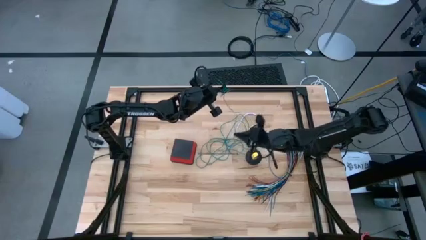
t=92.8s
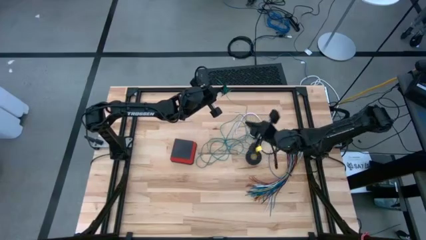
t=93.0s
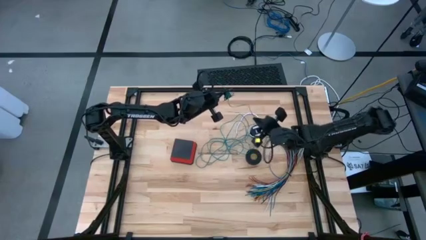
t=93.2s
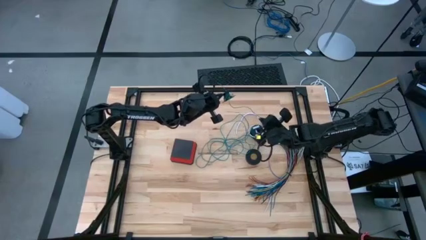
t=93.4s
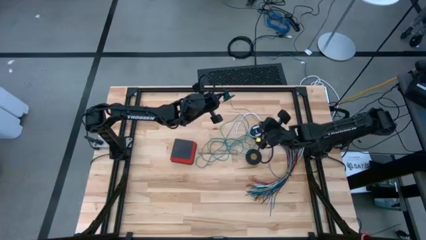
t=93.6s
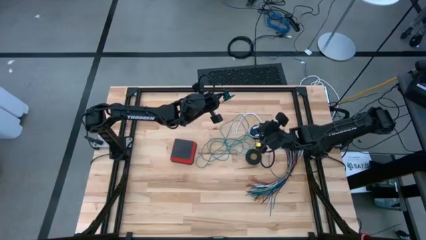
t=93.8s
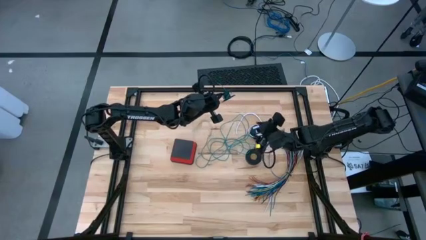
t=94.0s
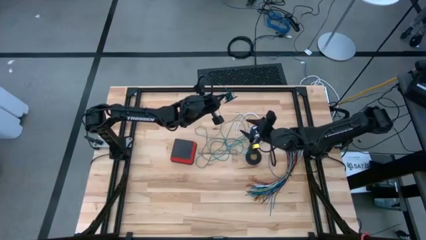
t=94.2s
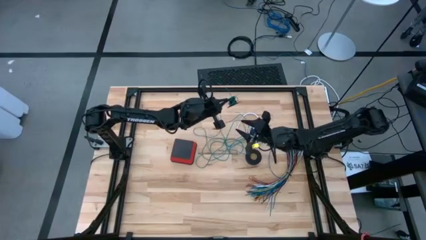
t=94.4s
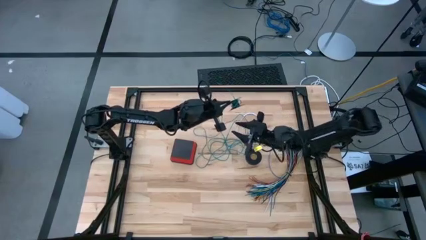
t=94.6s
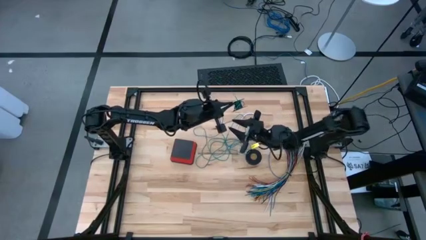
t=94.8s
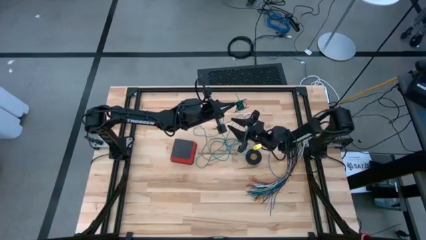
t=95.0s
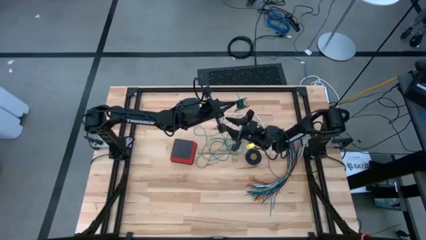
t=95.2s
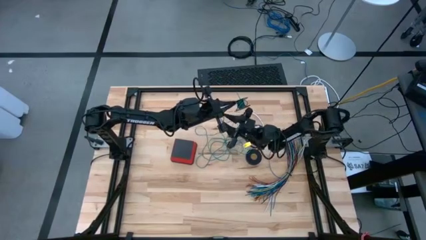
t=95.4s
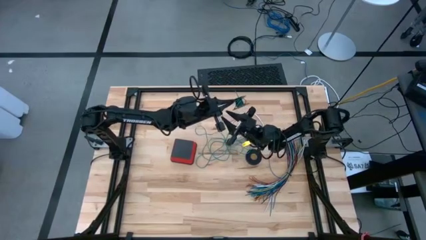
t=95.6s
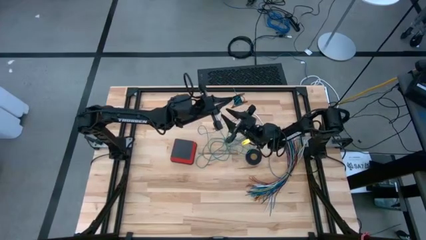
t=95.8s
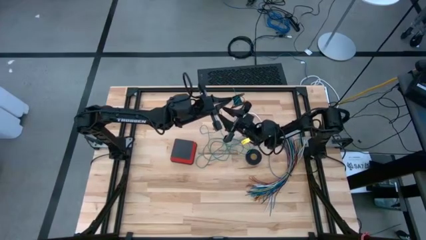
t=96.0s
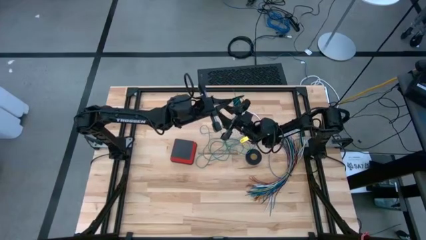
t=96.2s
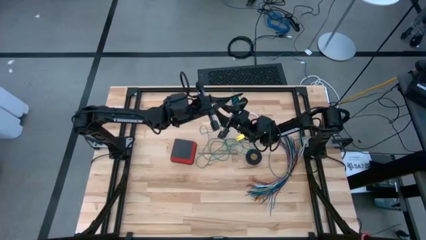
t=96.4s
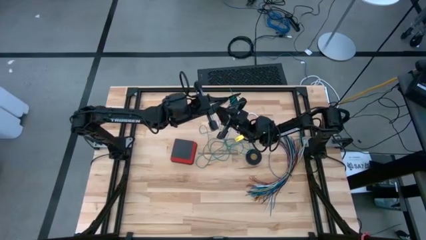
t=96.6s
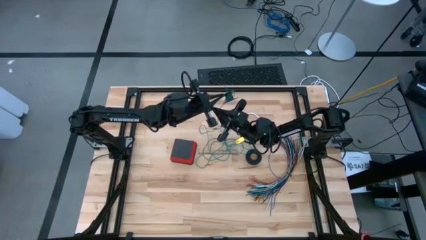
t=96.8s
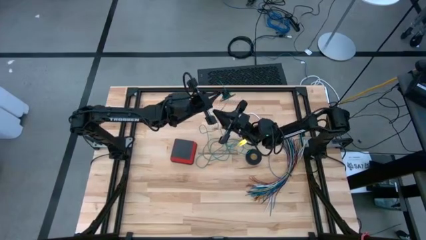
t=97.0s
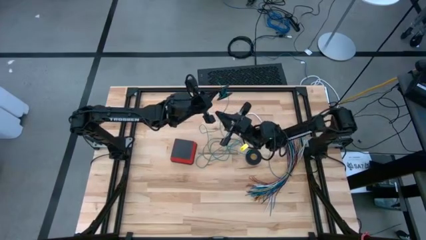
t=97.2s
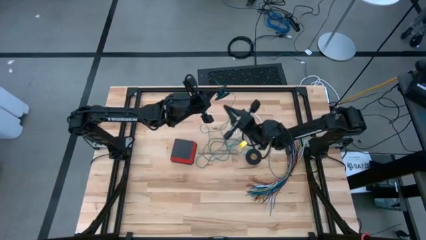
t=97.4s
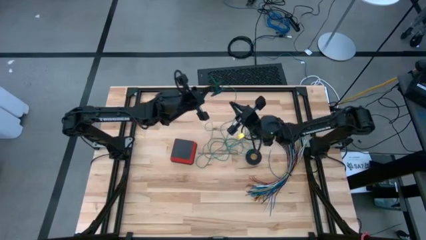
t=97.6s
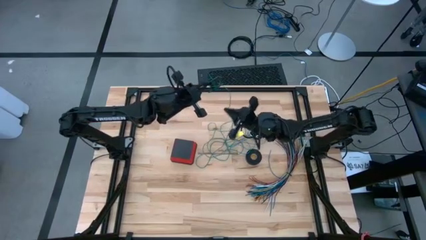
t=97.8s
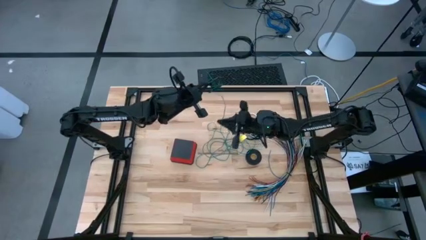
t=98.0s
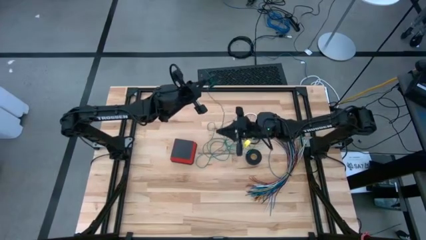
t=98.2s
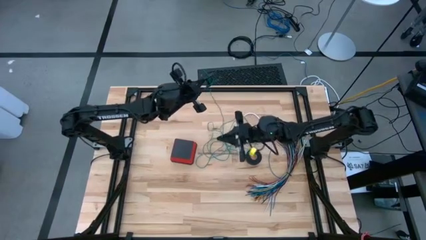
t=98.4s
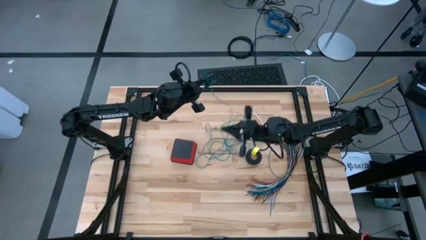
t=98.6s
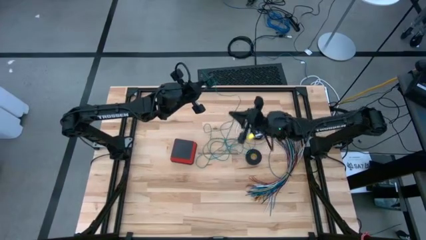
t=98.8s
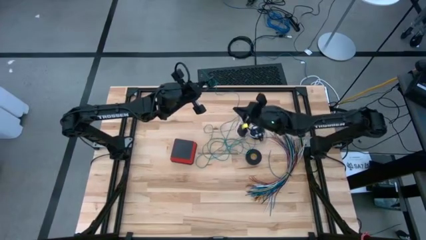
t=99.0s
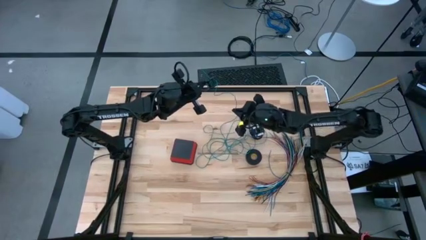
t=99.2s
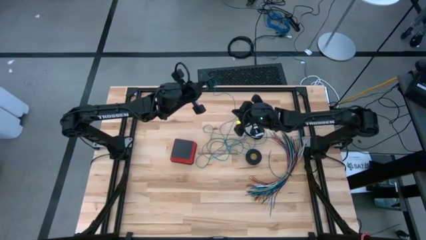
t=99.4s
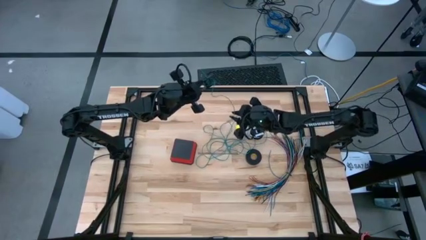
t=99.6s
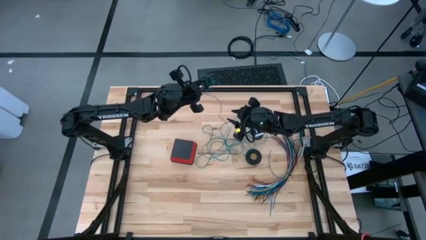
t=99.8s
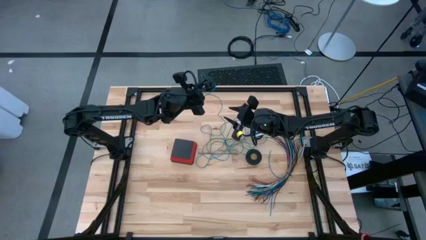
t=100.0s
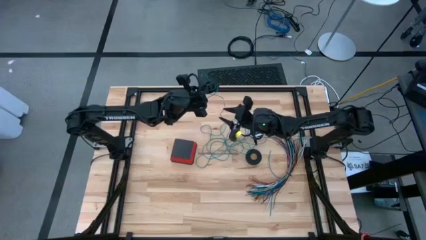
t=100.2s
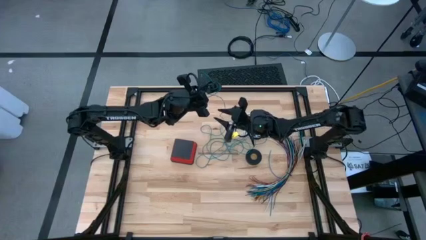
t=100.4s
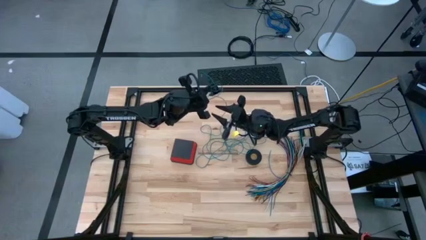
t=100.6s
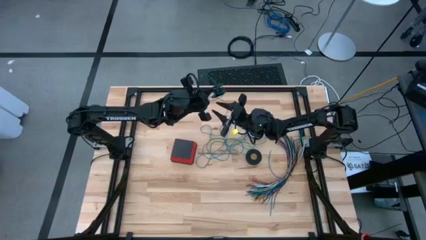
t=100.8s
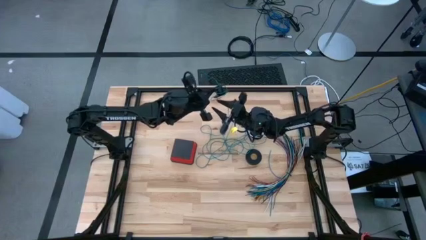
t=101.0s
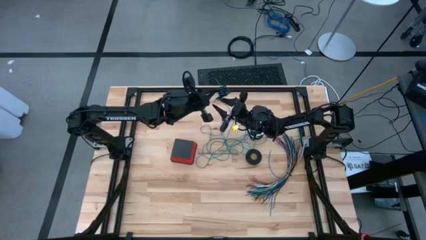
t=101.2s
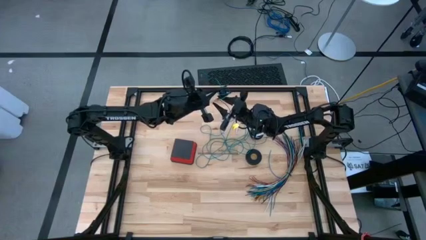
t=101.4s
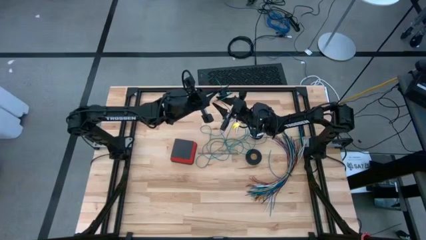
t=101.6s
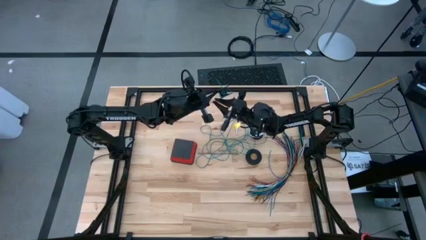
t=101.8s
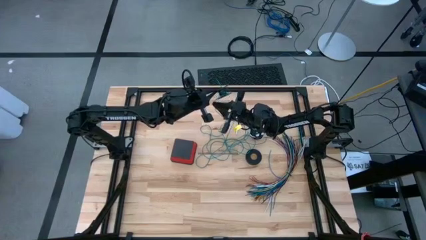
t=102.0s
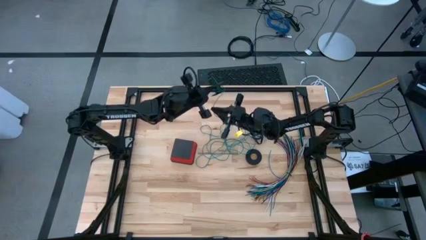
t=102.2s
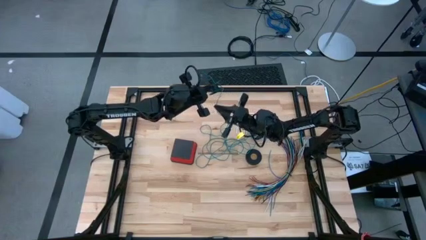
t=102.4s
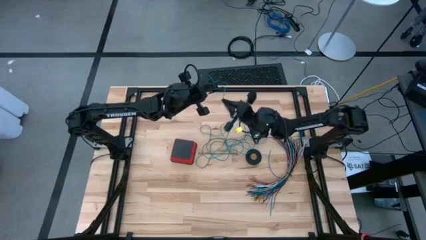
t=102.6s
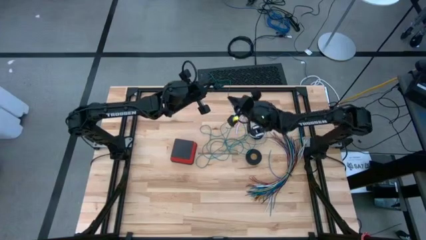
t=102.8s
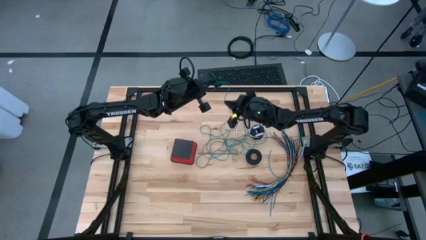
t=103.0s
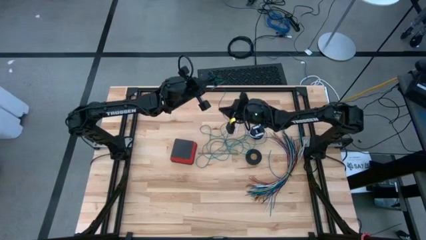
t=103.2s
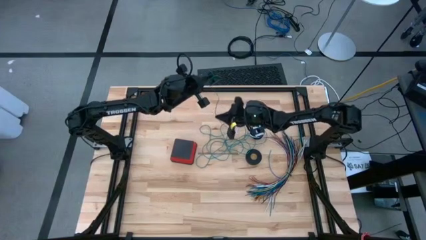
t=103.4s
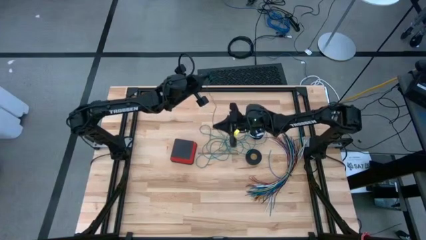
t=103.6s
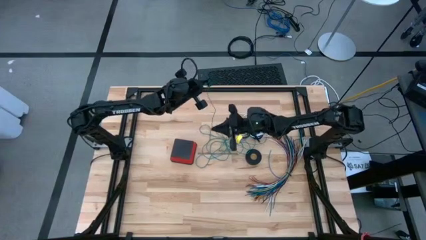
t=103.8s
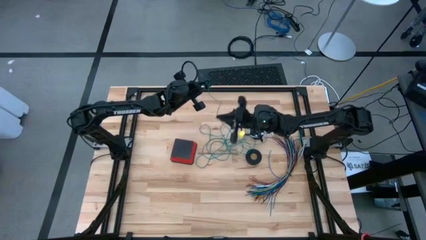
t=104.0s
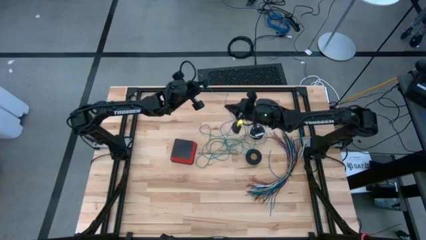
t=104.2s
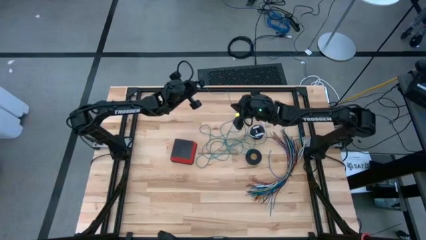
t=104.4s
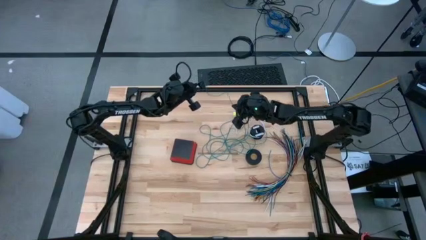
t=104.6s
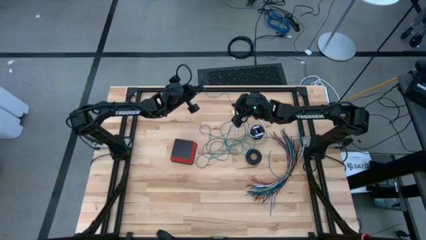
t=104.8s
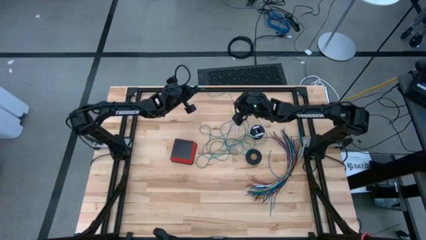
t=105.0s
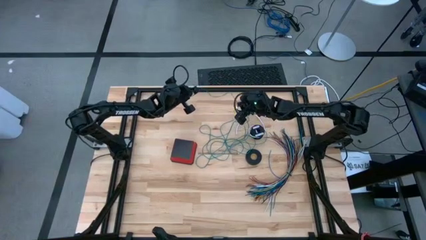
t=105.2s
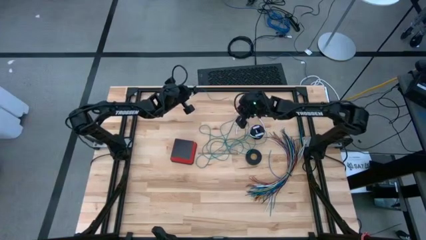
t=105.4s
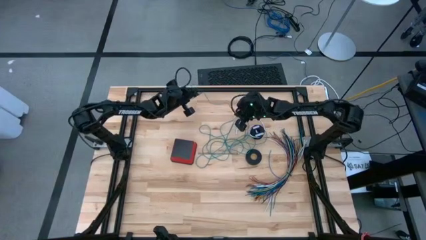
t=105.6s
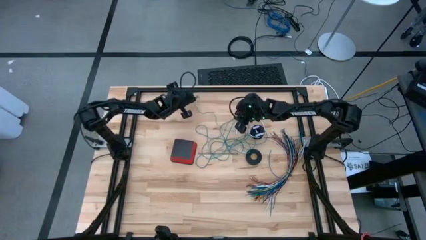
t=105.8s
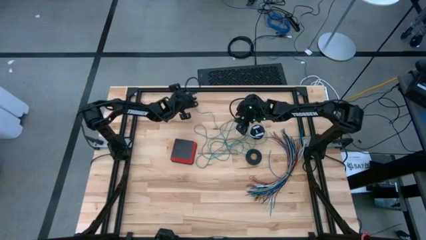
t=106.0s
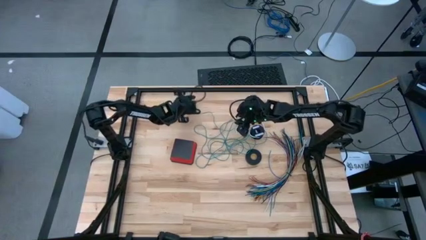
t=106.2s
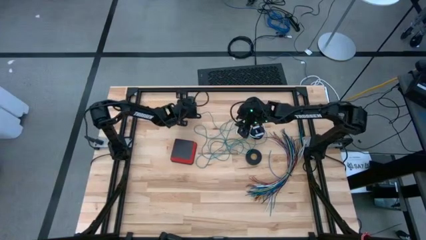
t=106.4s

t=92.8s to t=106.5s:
Task: Coiling cords
Uncoil the green wire cable from the spool

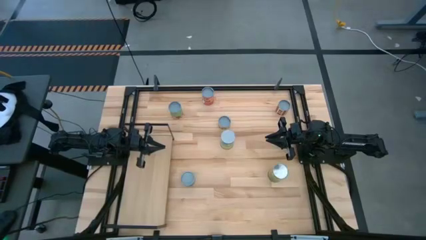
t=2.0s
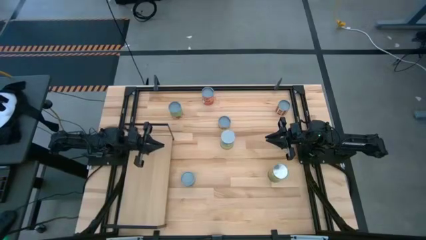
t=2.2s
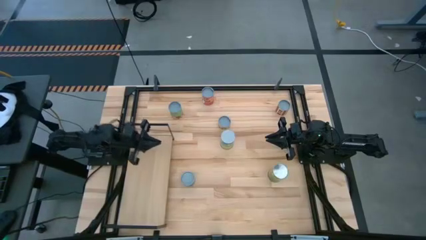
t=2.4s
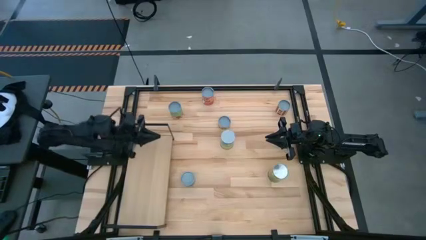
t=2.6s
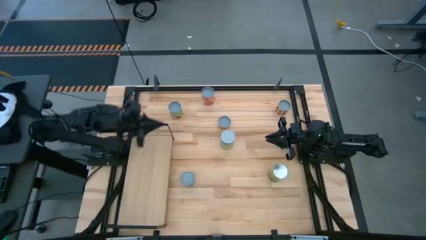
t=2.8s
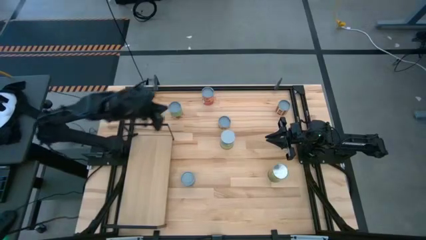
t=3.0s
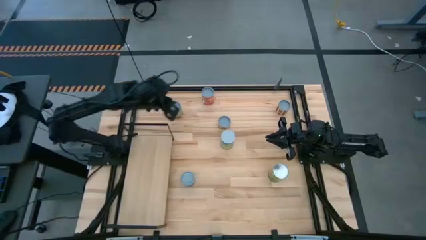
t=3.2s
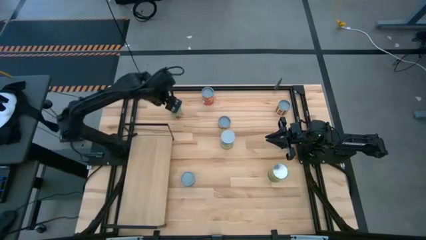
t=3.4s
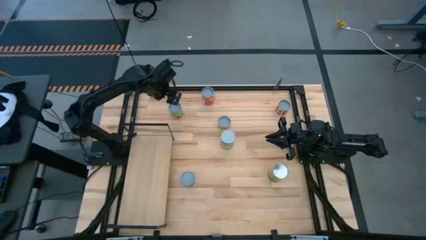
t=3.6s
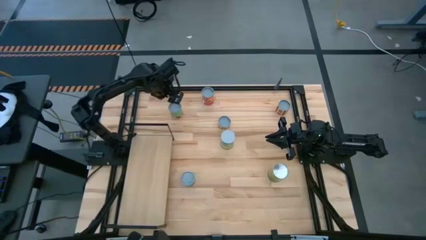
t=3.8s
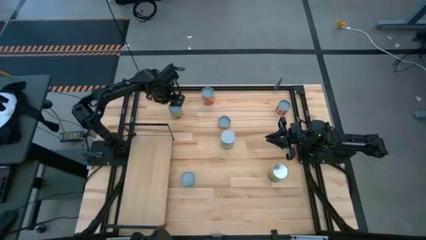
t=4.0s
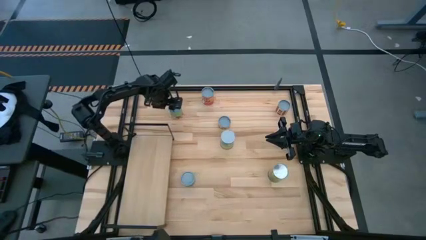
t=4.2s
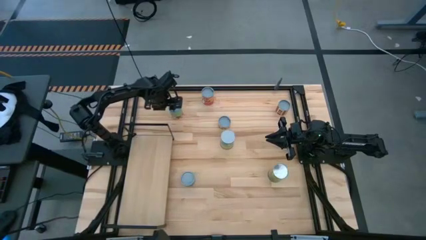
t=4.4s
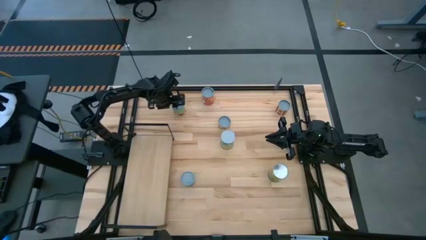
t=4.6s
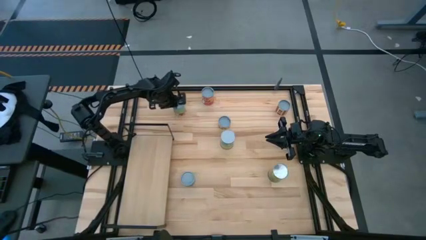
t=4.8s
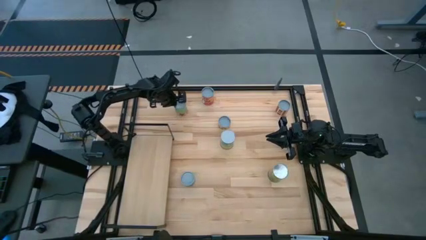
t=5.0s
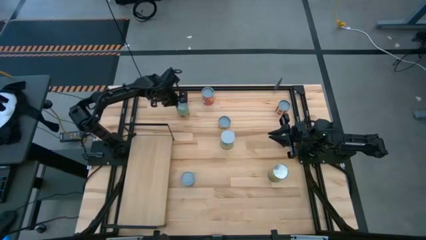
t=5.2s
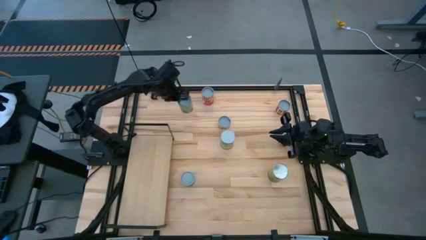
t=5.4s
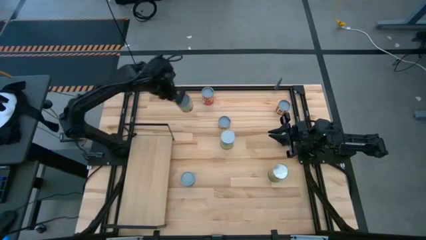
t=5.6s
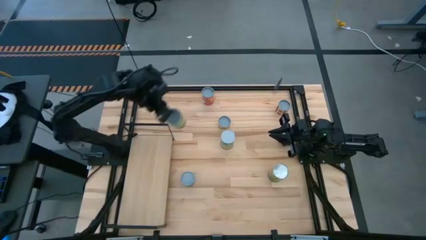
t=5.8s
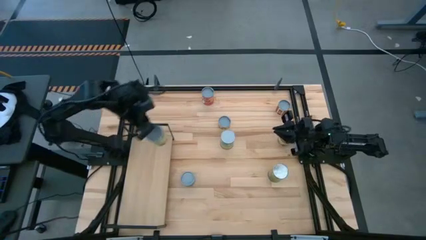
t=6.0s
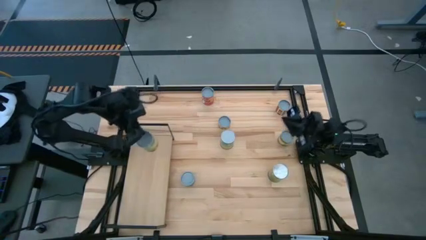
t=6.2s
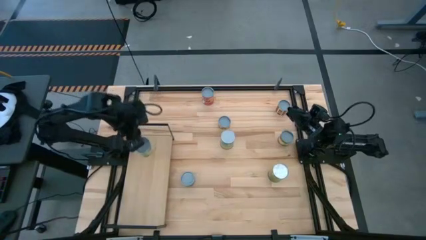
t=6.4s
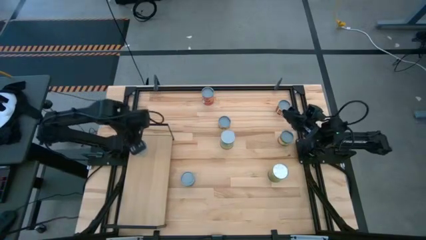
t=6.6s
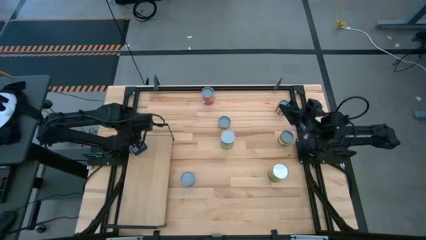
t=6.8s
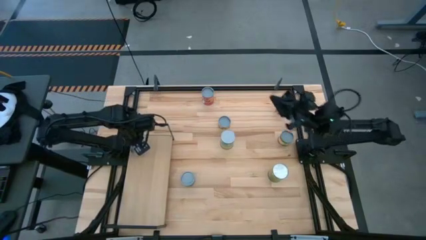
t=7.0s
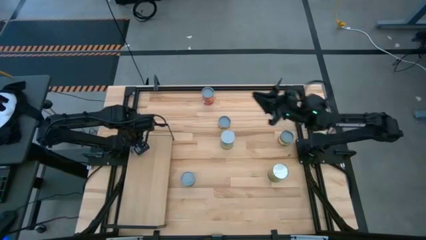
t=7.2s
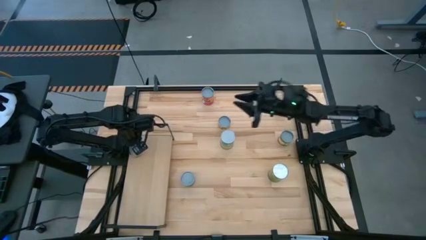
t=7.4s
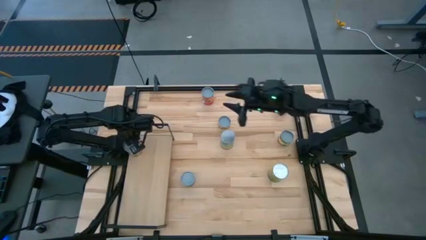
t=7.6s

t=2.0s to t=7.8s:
Task: Pick and place cans onto a shelf
Put the canned spaghetti sauce on the shelf
